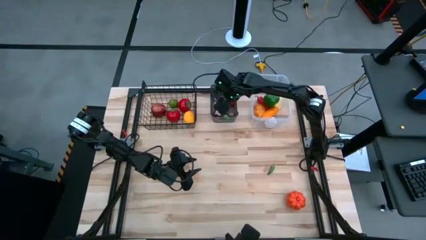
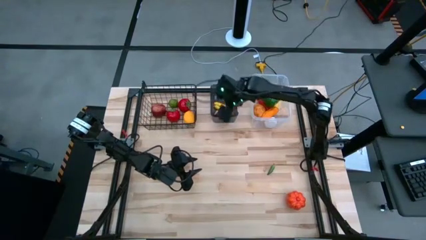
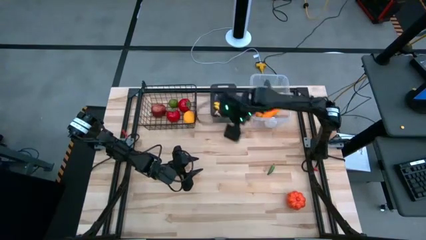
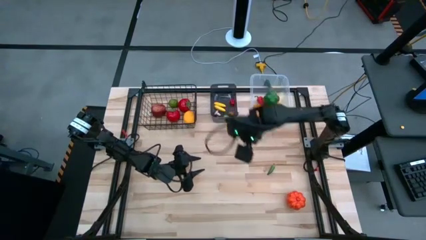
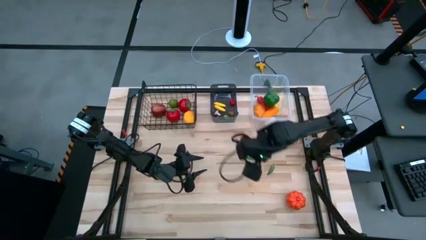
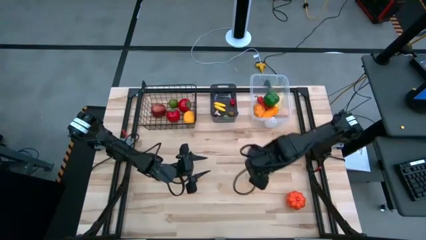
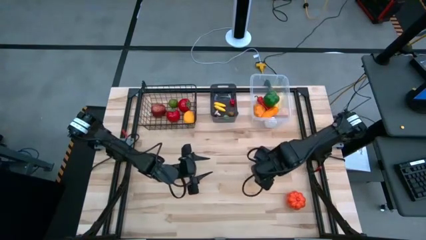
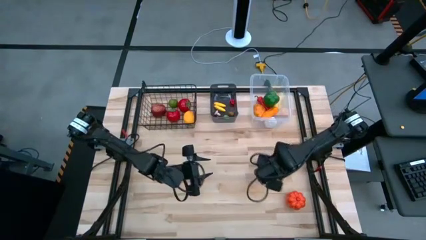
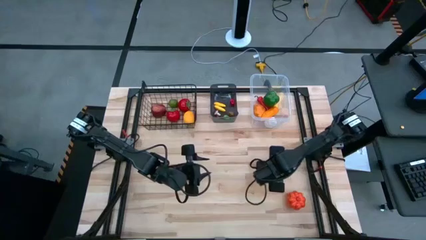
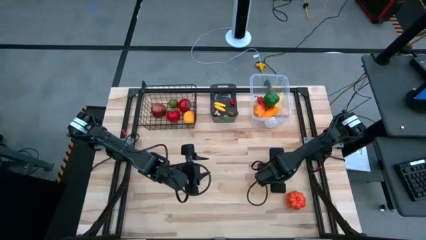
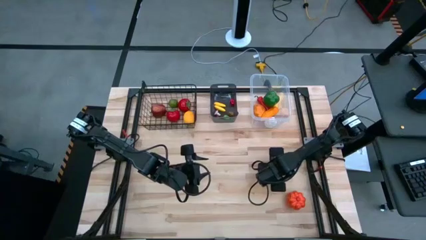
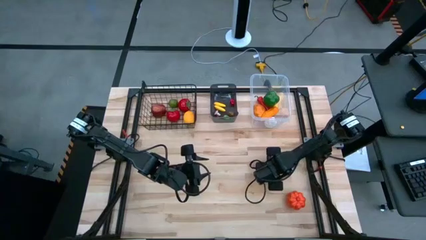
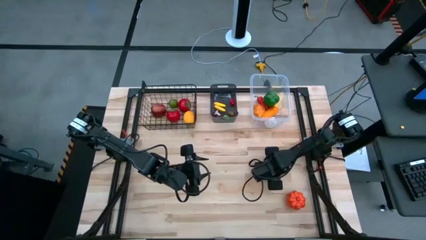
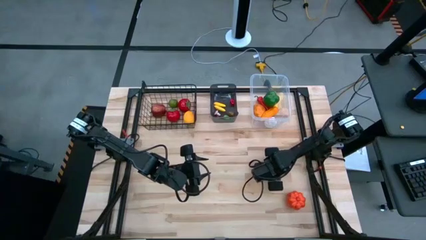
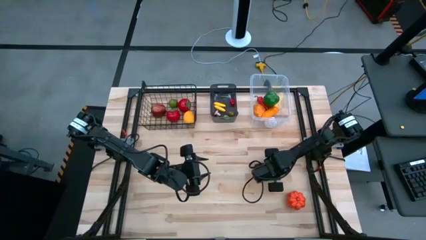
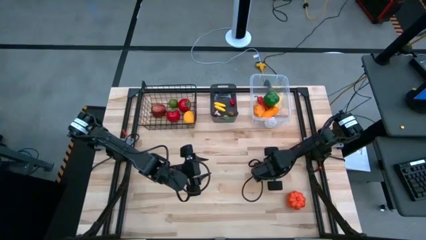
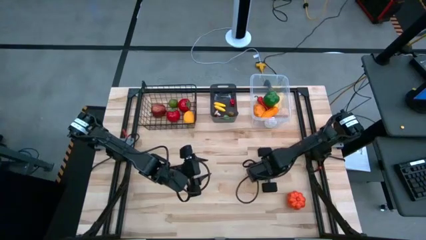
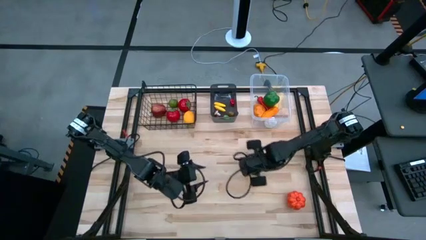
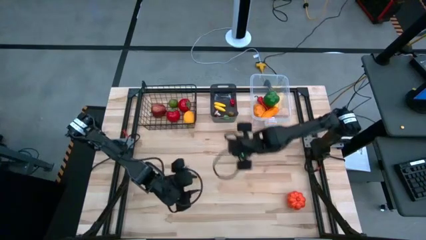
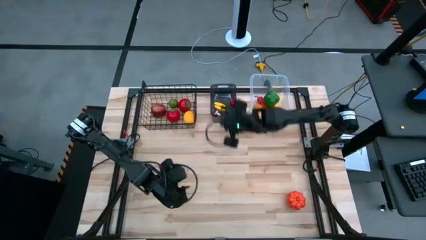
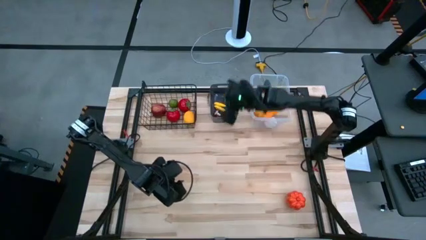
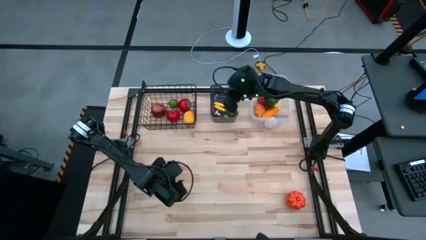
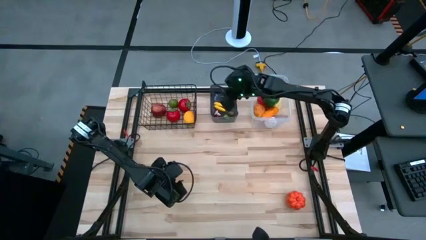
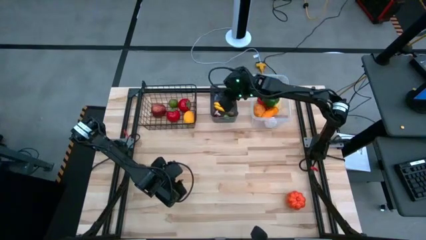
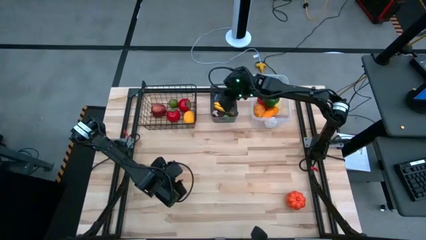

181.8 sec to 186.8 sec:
Task: Sort produce into baskets
Put the green chili pepper into the black bin

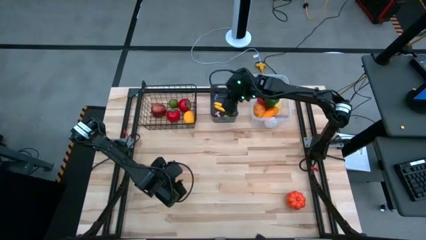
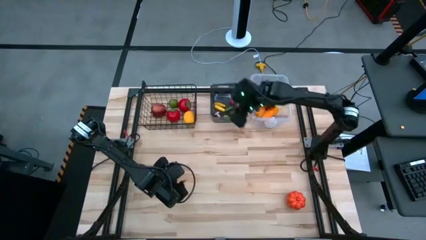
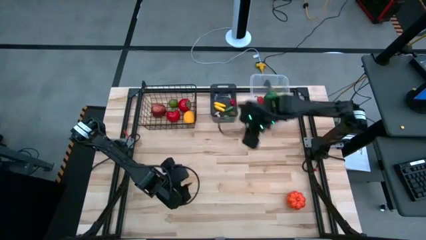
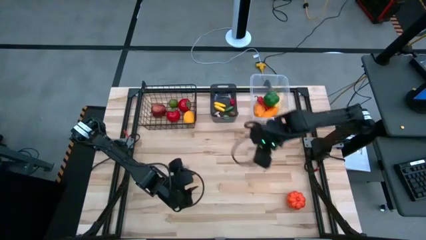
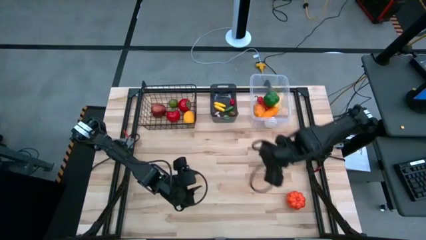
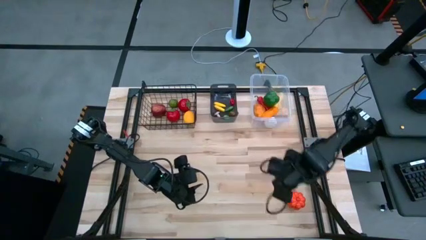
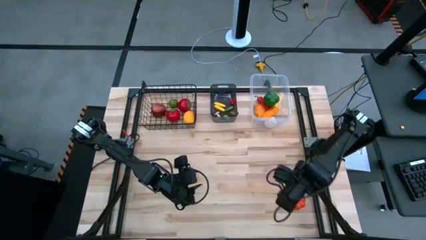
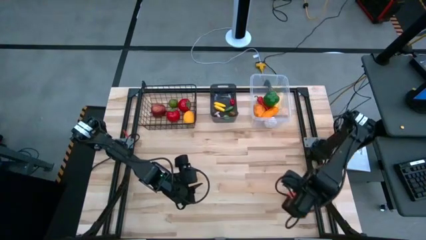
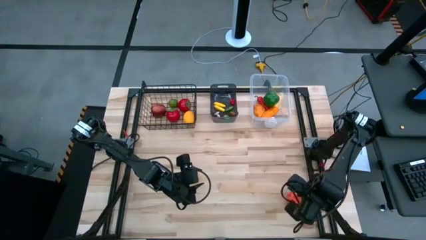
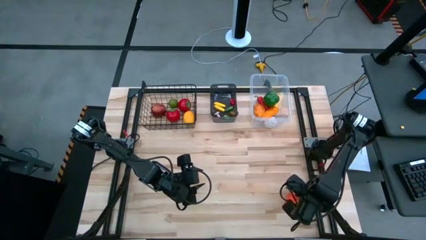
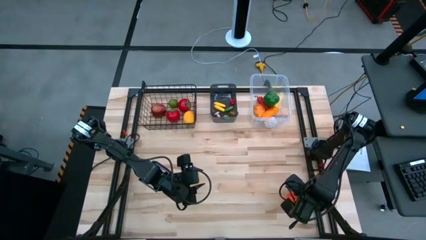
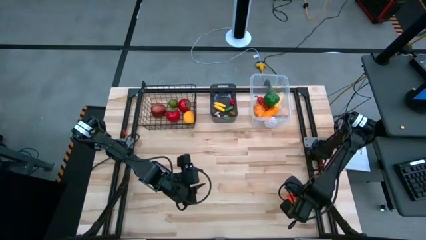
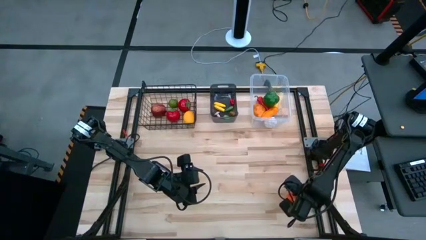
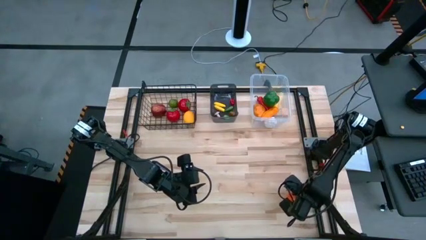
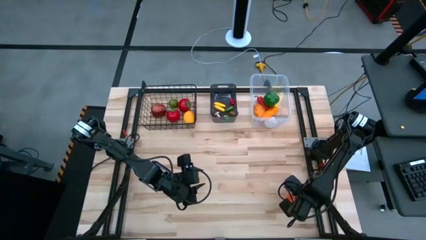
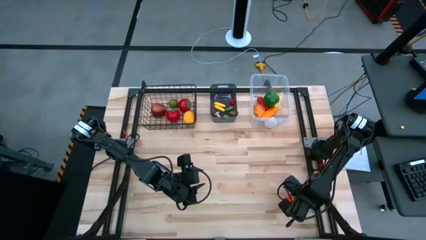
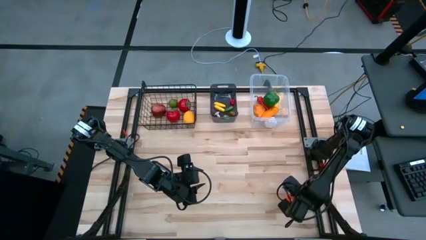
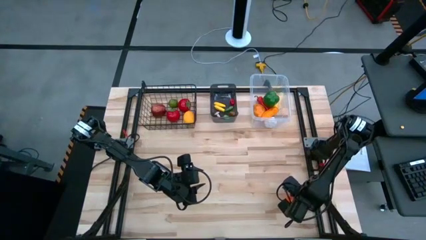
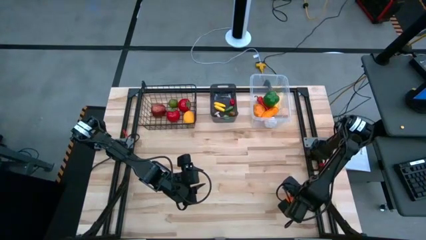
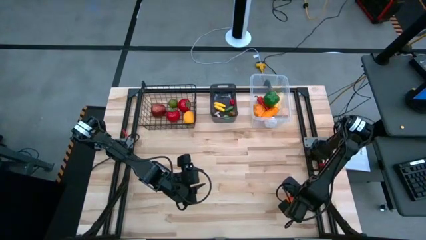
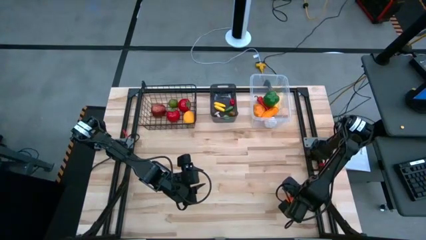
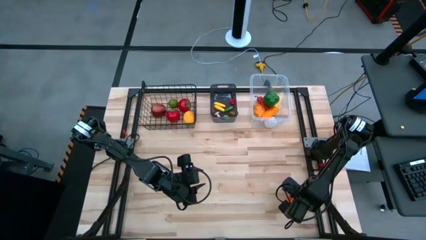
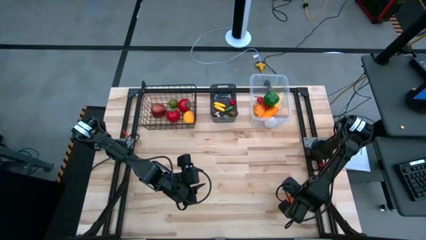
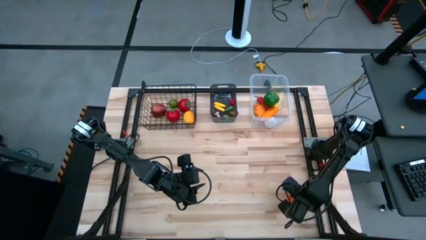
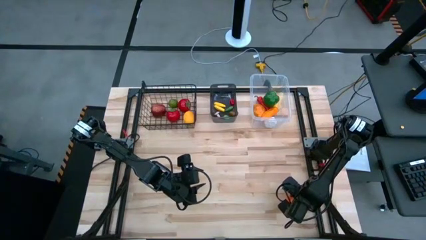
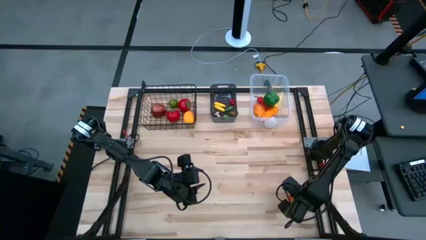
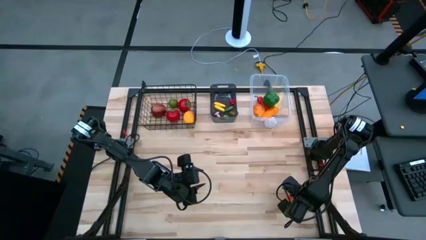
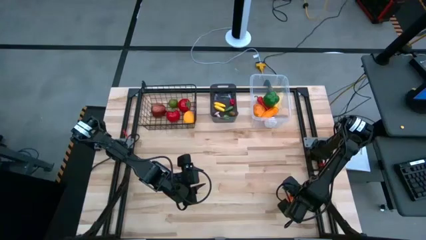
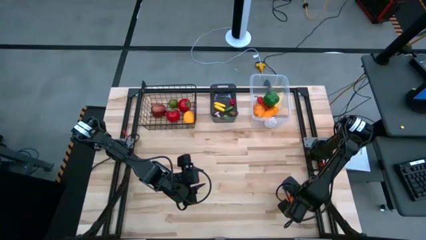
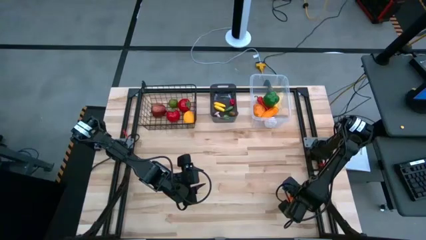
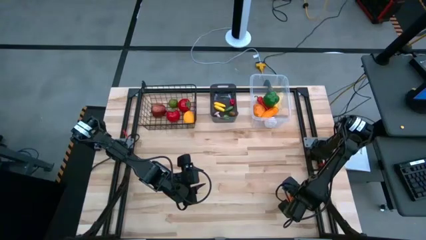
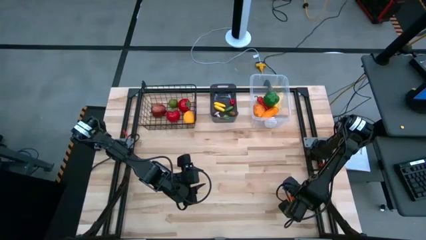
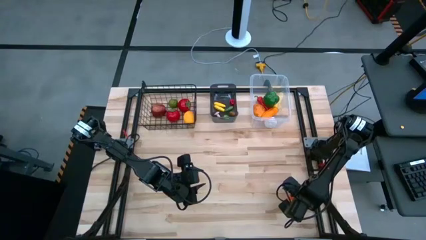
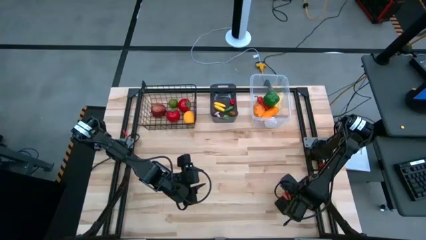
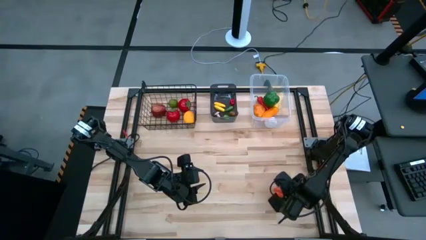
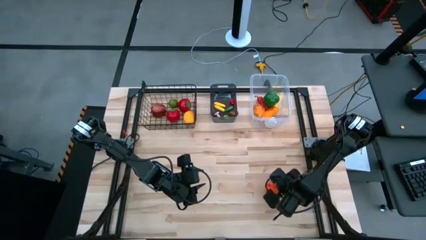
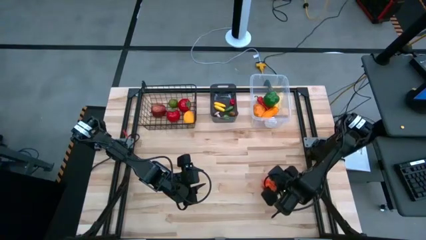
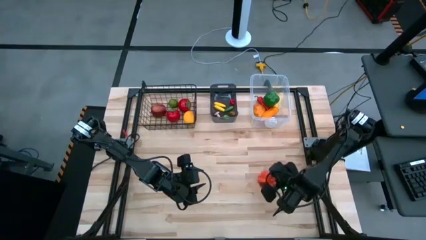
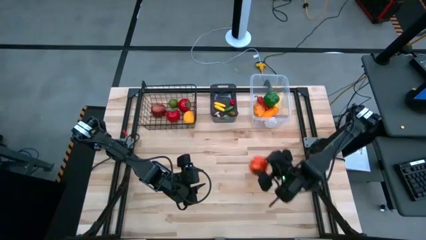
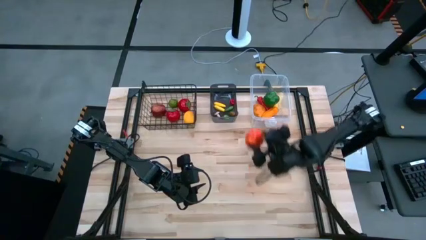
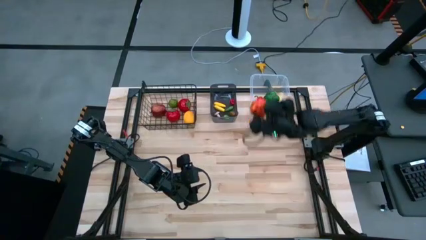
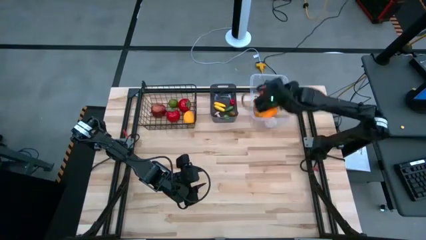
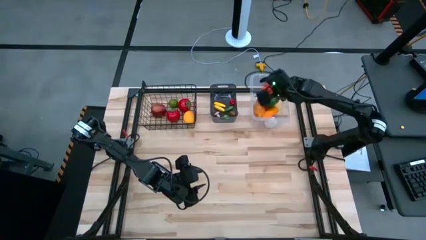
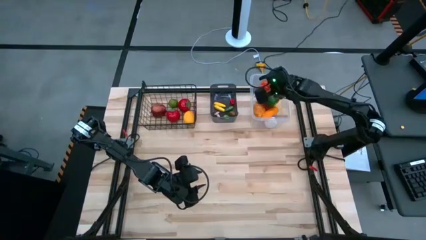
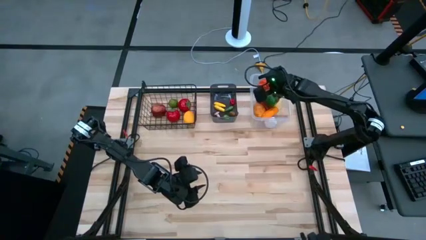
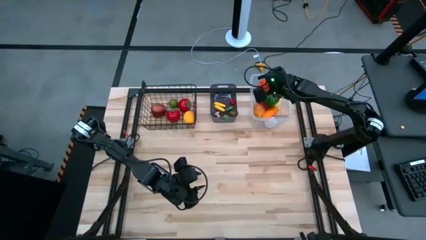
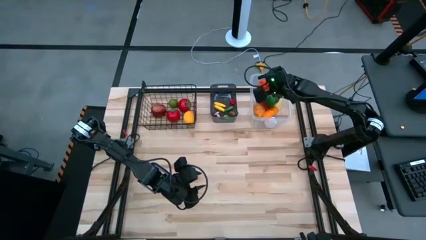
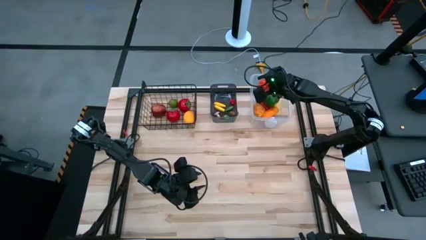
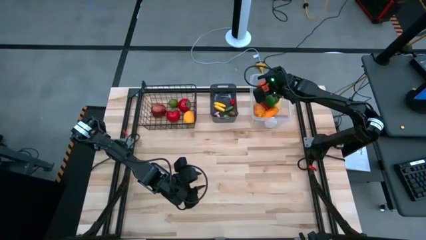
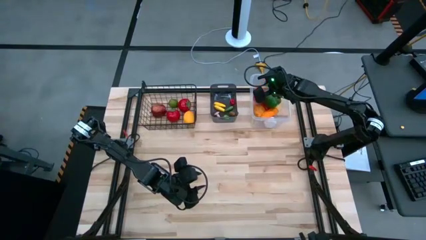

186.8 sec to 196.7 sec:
Put the pumpkin into the transparent bin

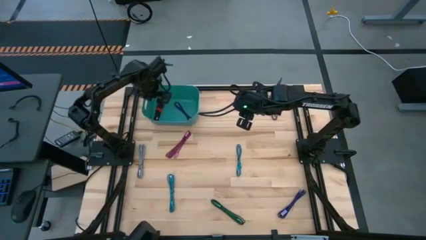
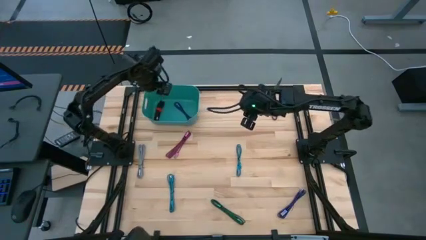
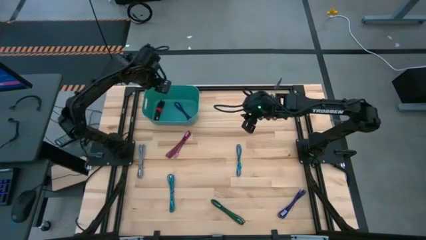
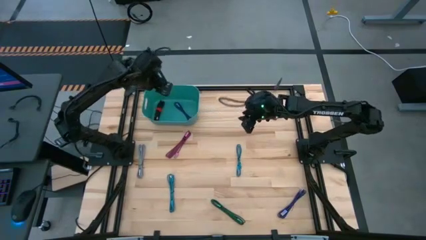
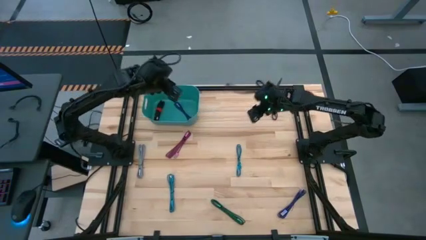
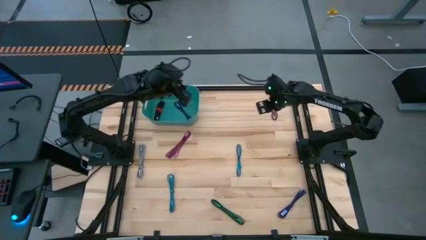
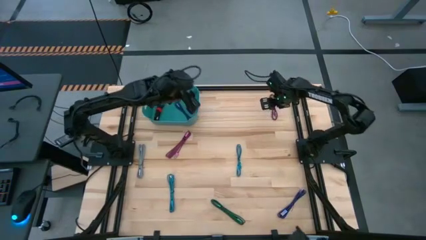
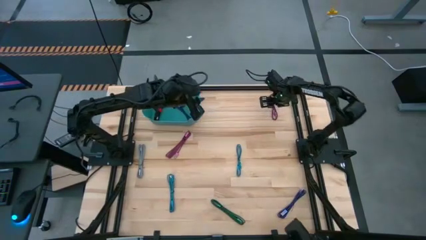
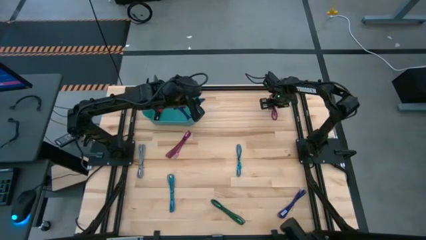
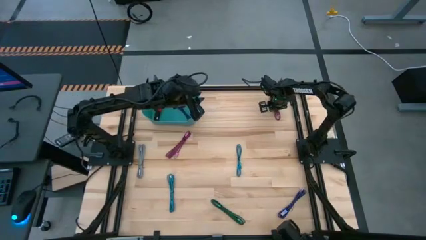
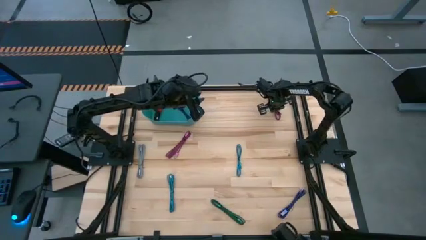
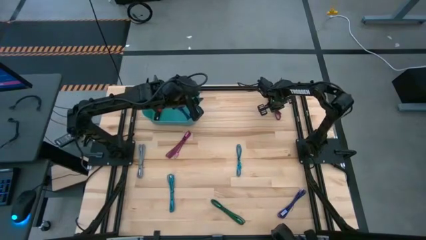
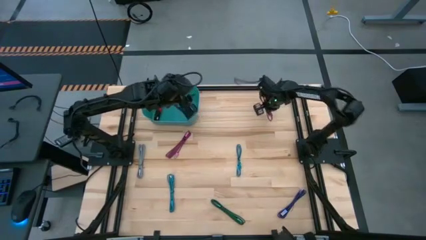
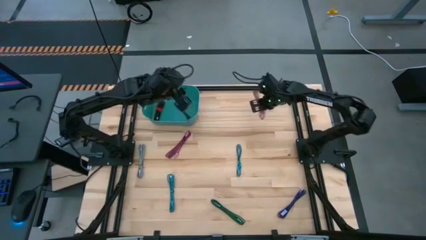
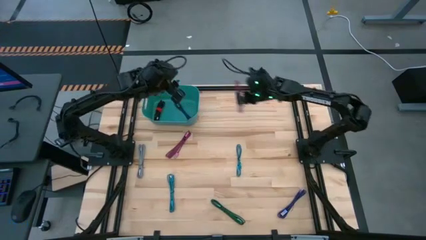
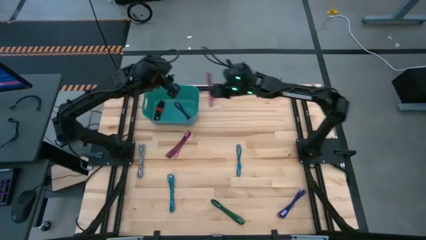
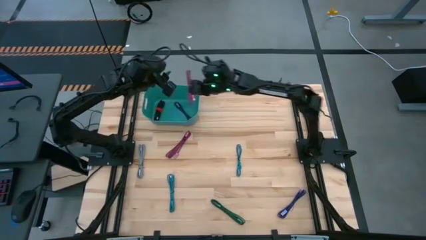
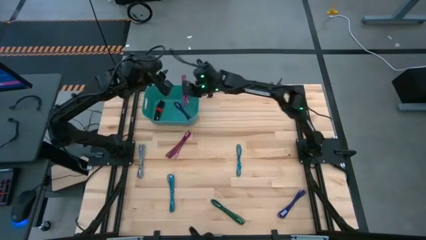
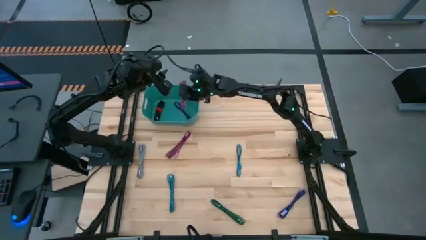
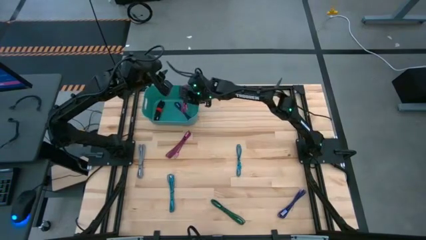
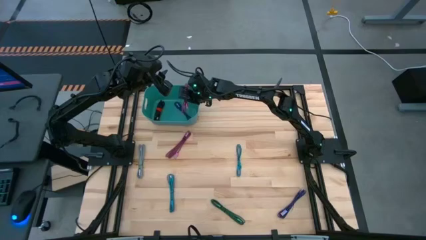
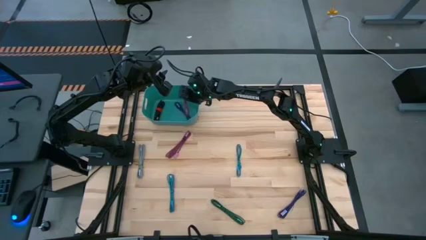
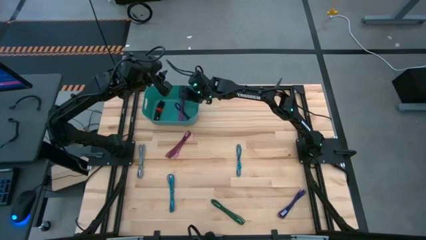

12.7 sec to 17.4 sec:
Task: Pick and place USB-C Cables
Put the right pink USB charger cable into the green bin
